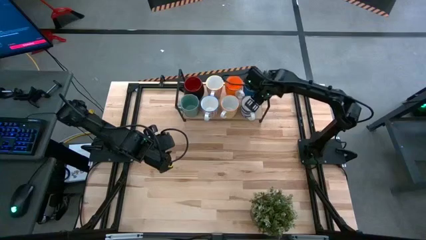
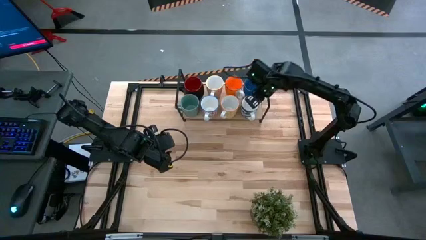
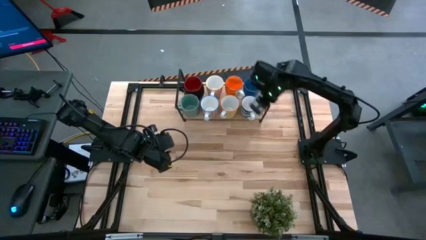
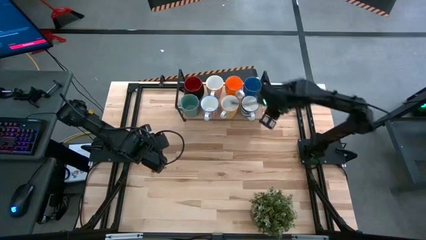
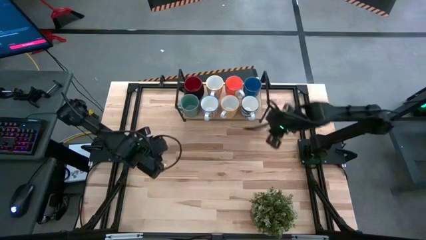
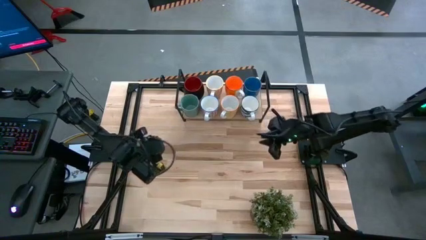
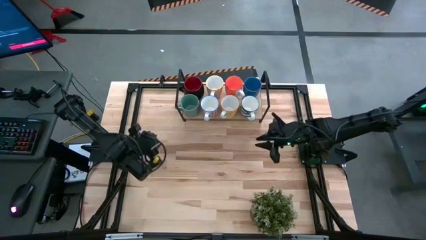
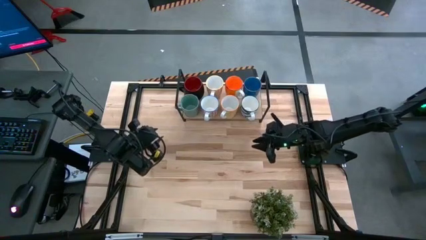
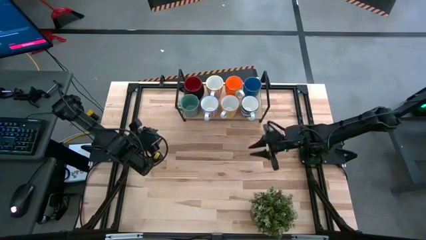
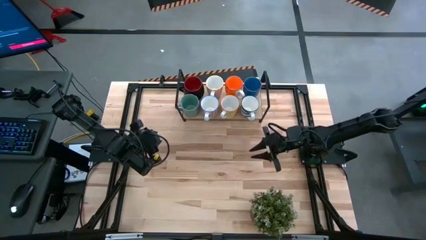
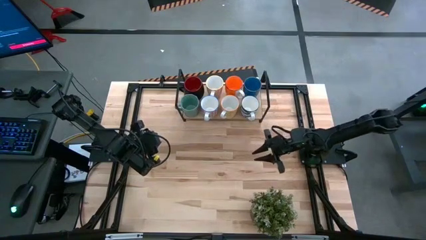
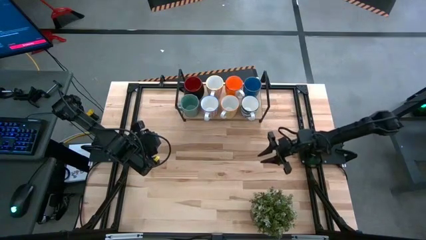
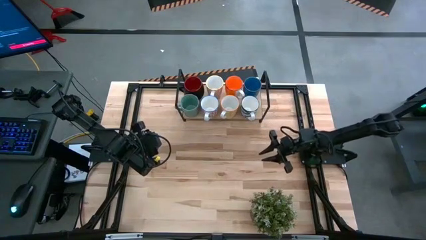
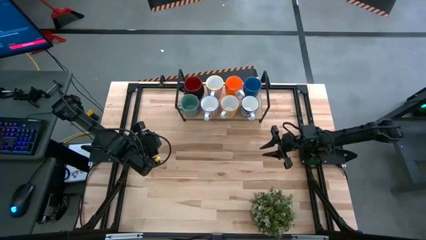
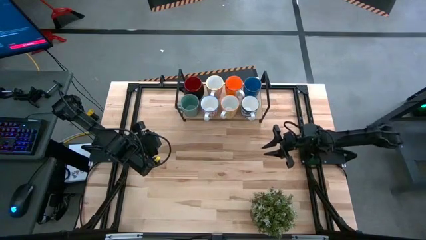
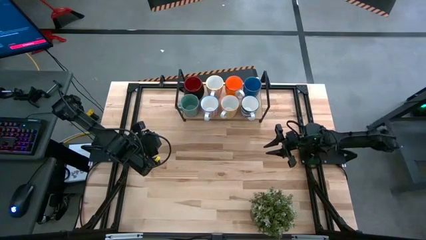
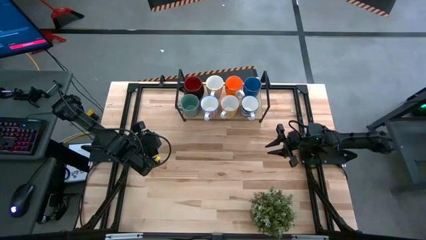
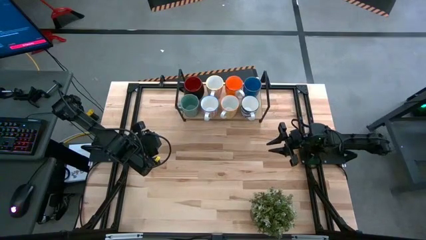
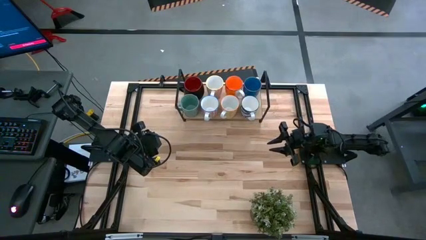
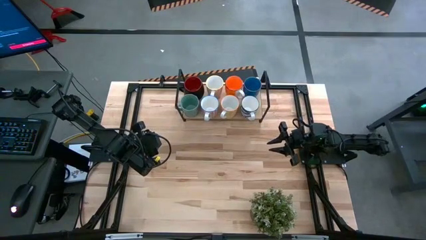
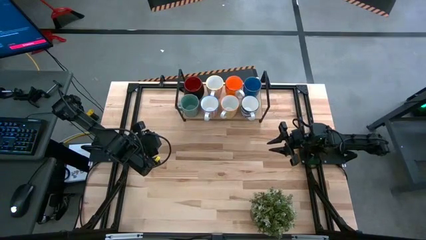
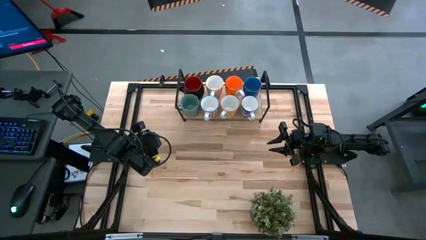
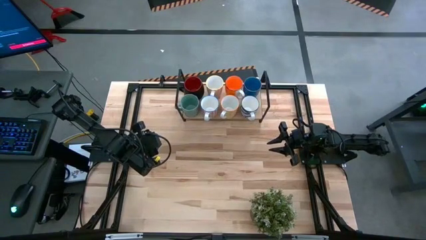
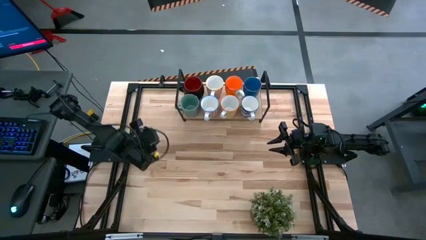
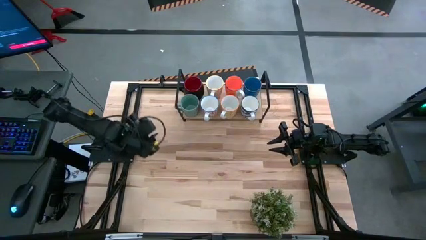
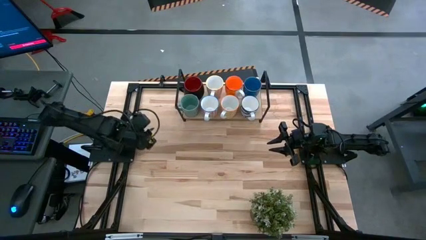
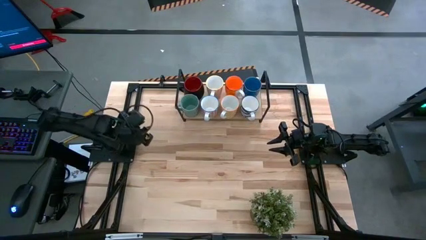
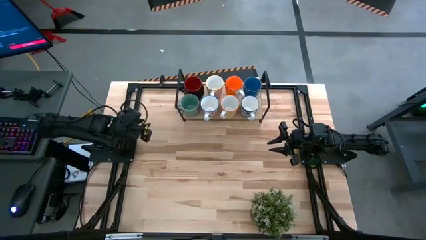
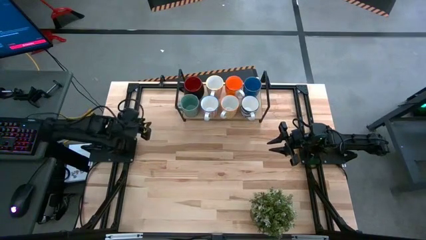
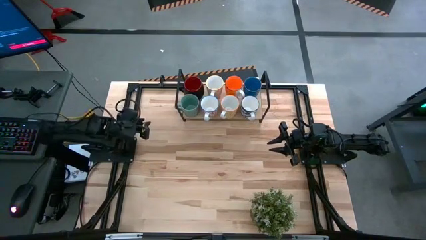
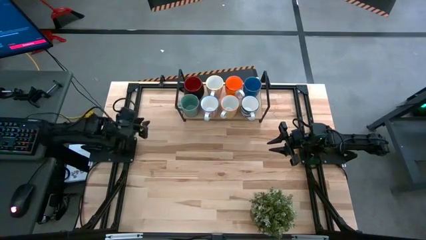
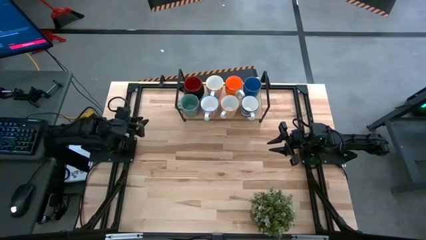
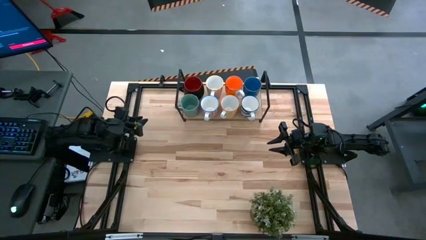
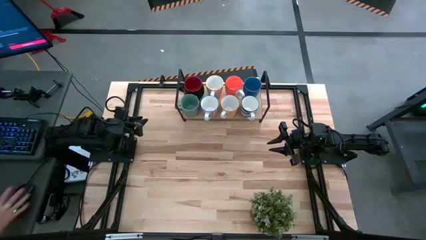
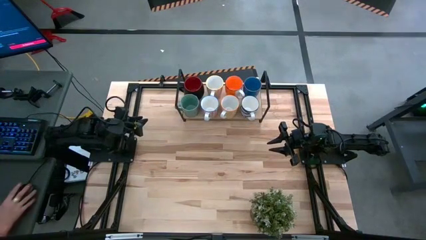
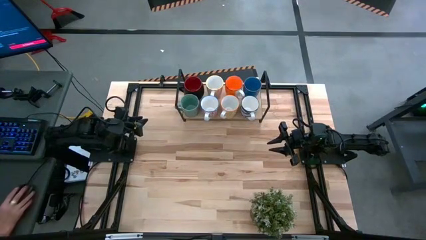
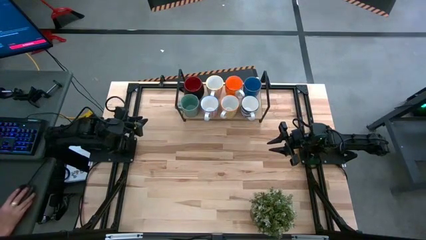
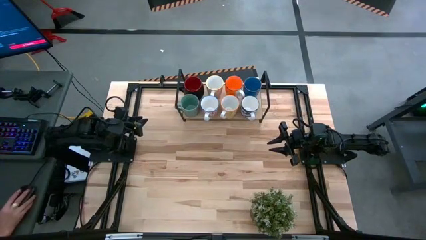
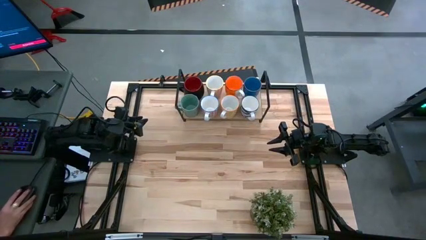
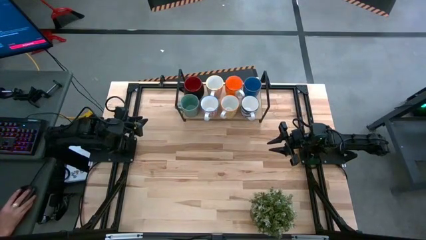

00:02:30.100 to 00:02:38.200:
Task: Place coffee mugs
Return to Home Position

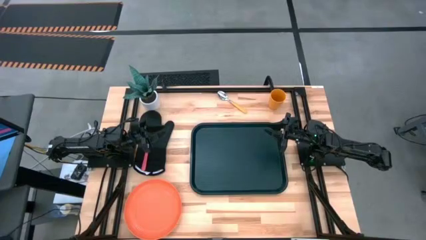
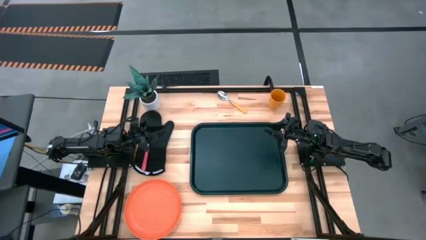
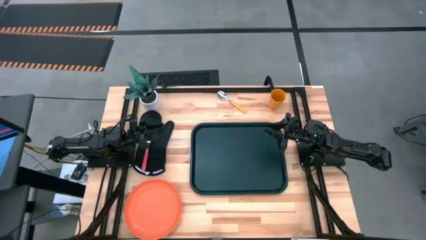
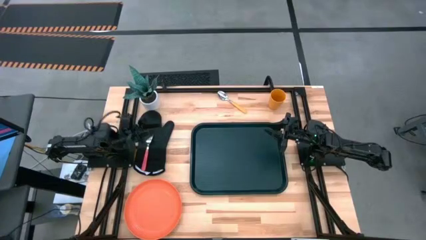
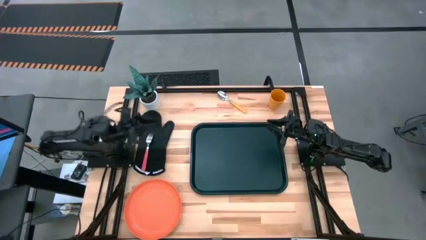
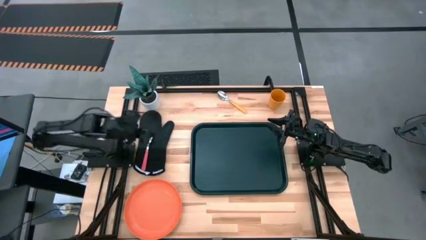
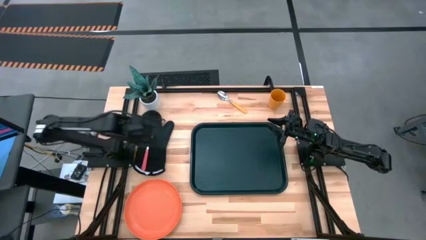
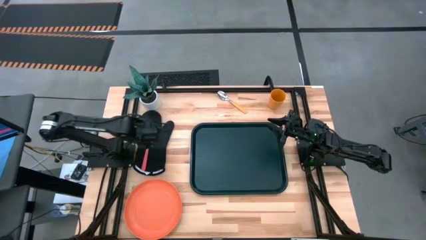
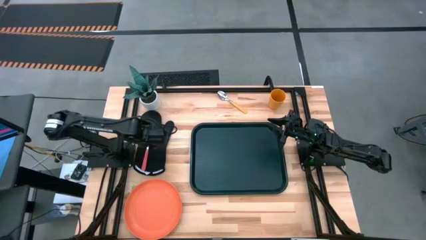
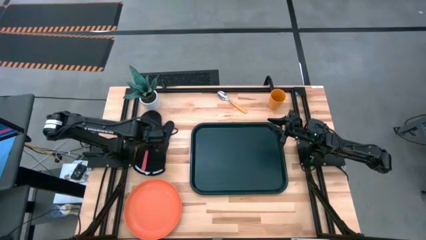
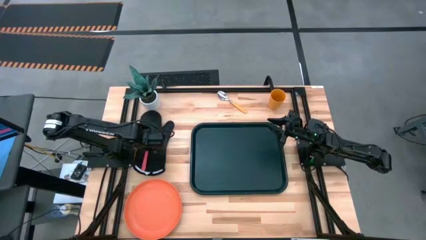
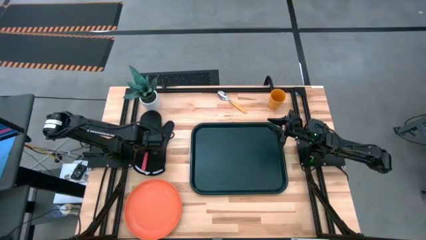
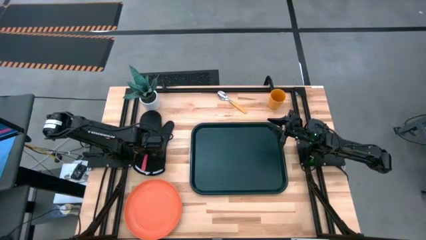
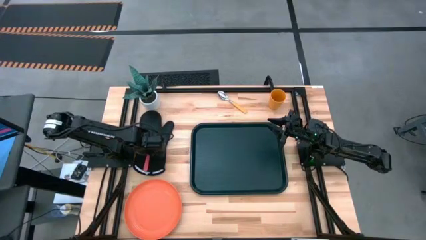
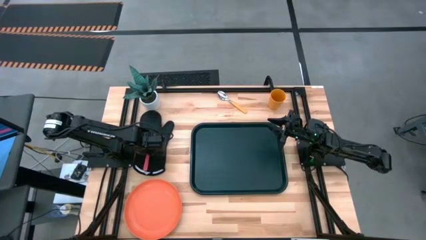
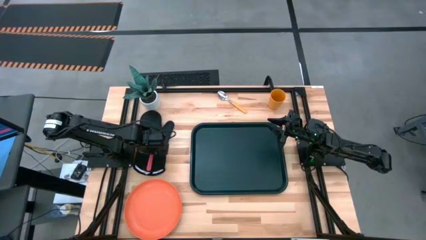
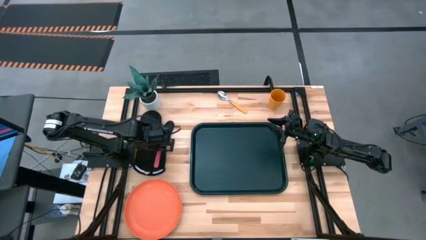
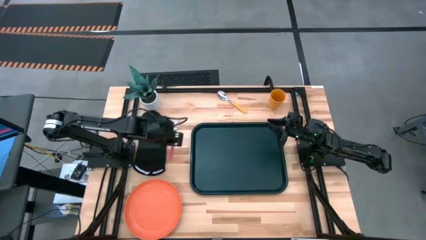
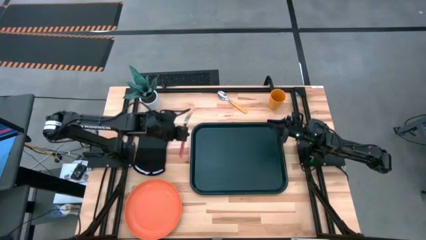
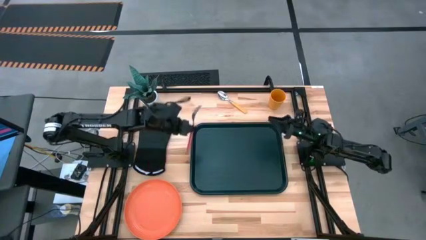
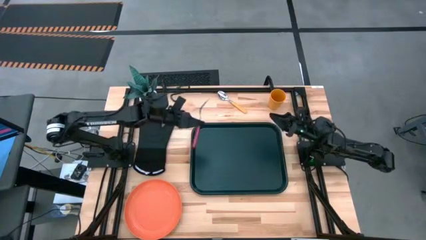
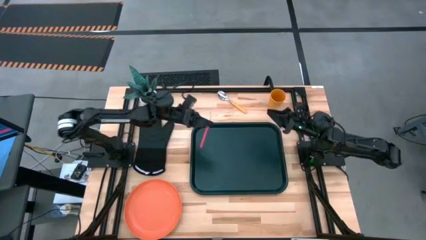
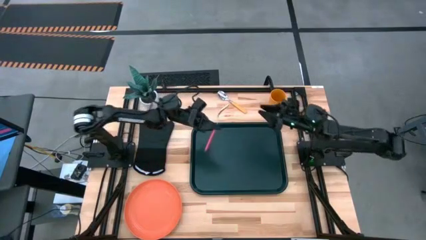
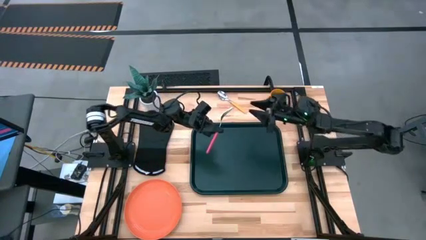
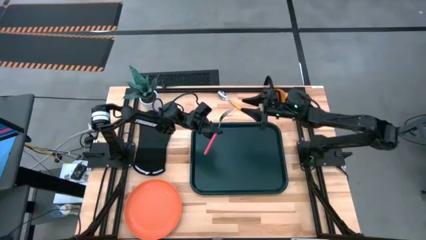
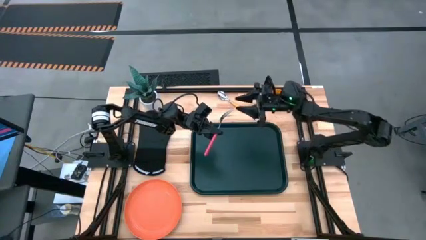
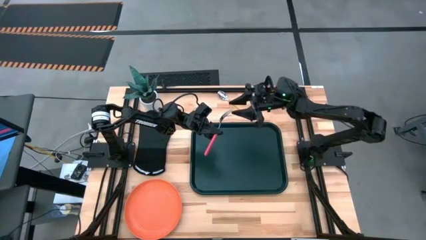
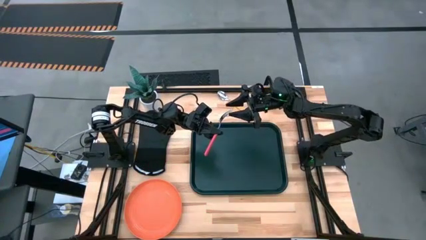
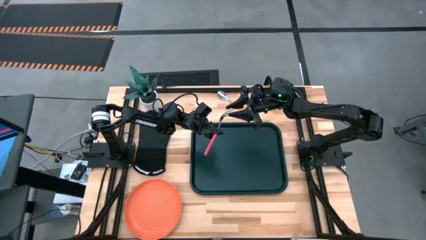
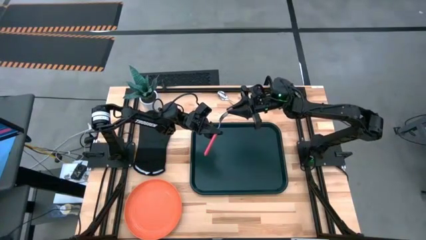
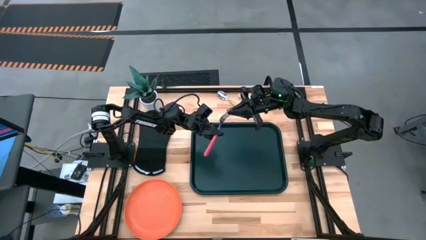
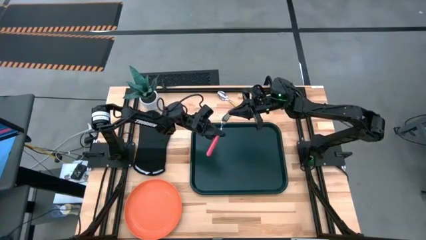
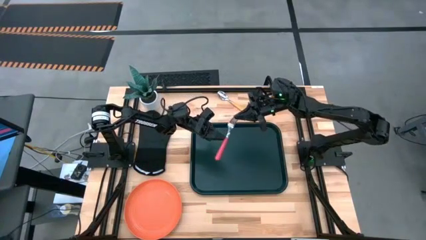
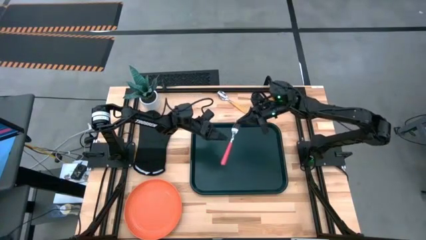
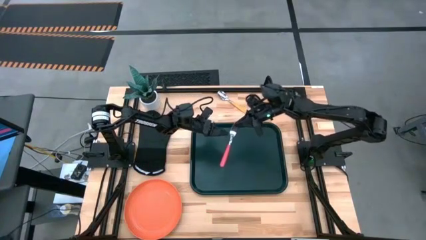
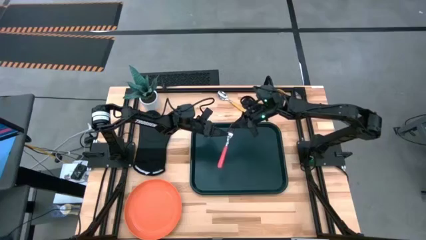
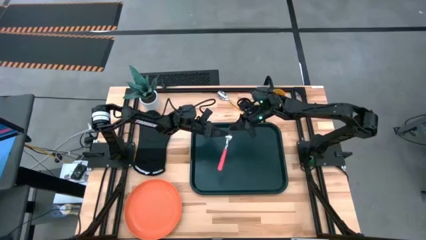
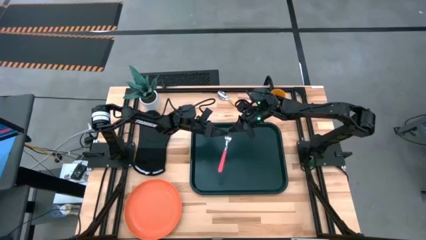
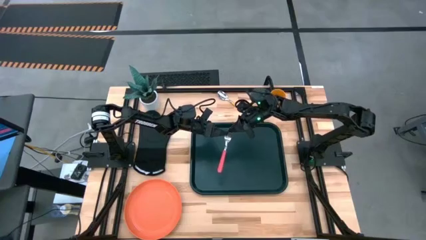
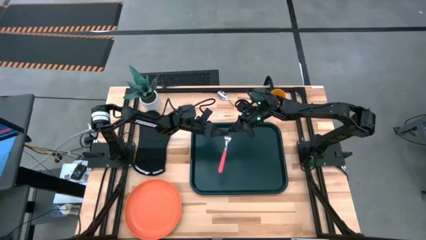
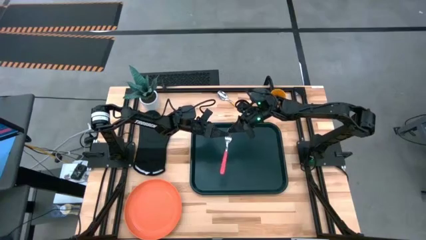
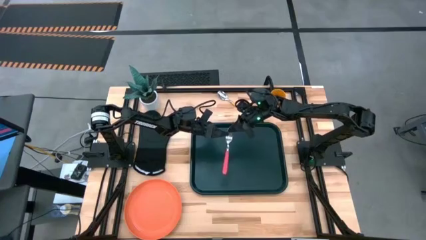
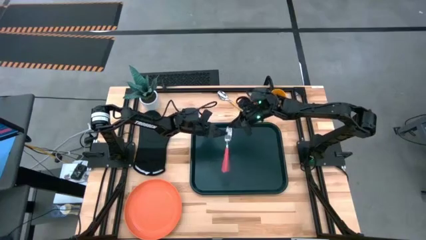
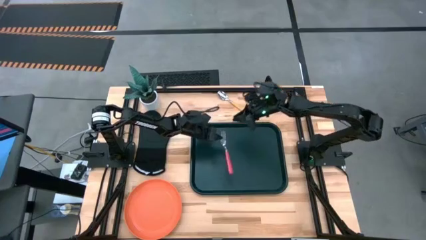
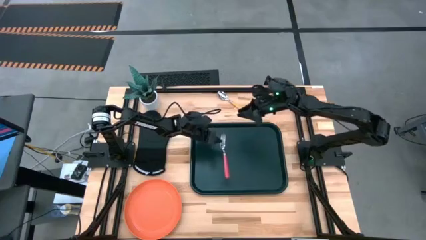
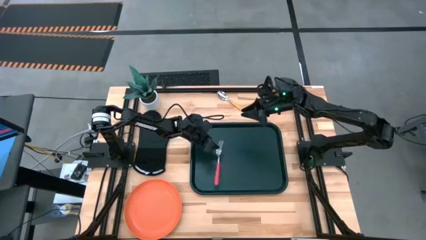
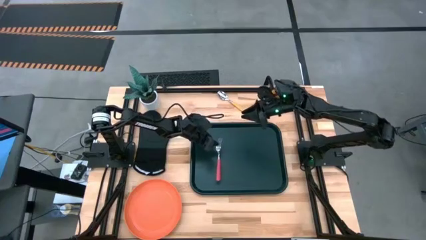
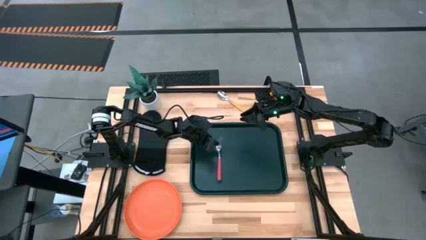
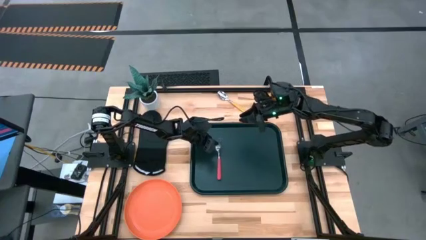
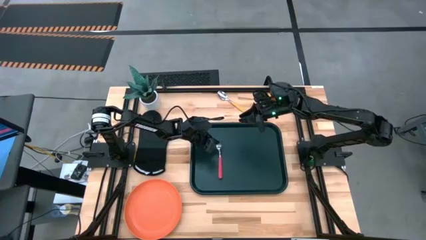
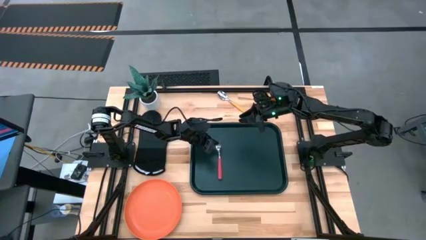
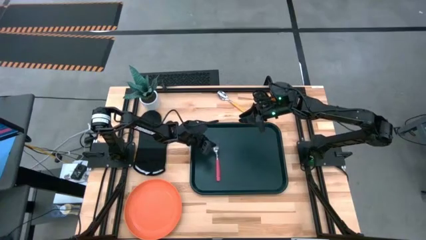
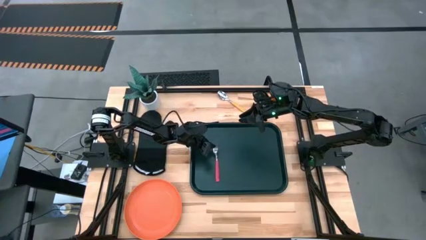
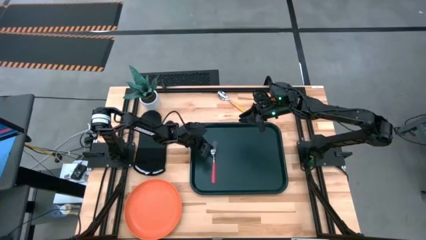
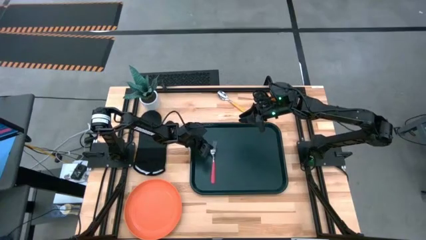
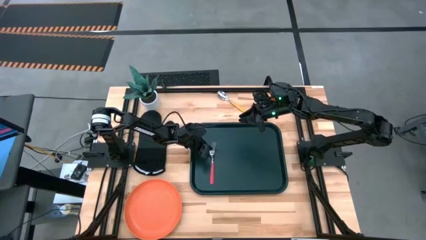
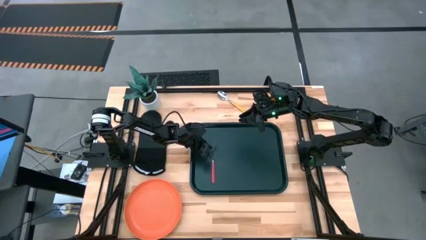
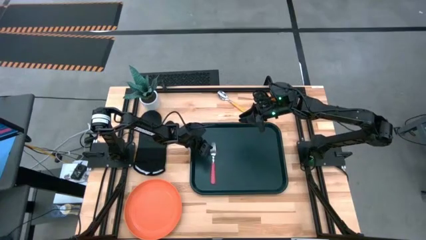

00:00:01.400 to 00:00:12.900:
Task: Pick and place plate/cup/fork/spoon on tray
Put the pink fork on the black tray
